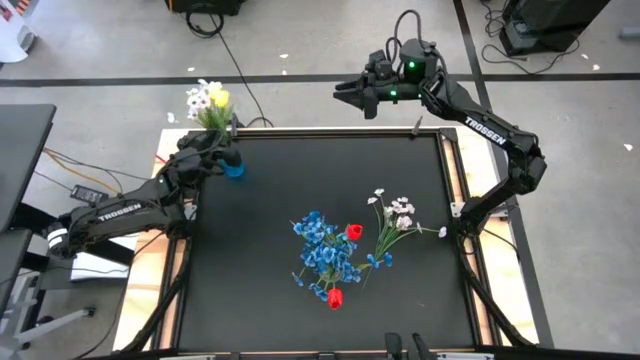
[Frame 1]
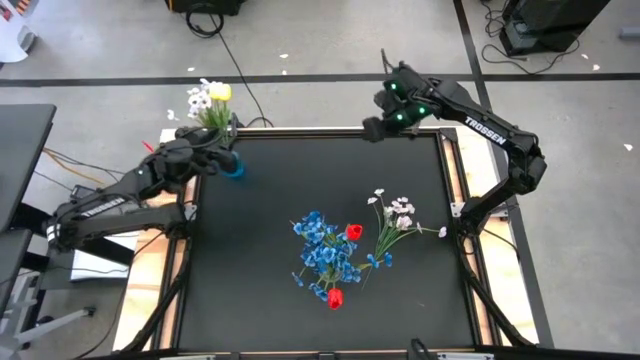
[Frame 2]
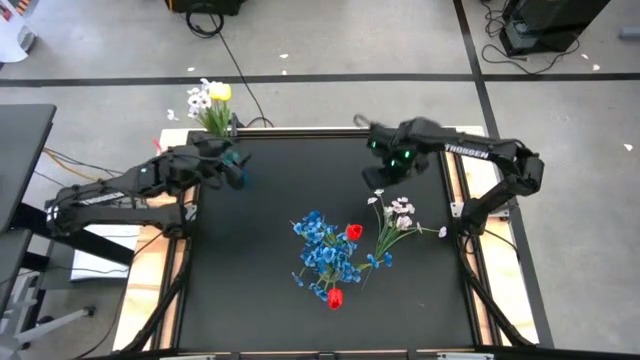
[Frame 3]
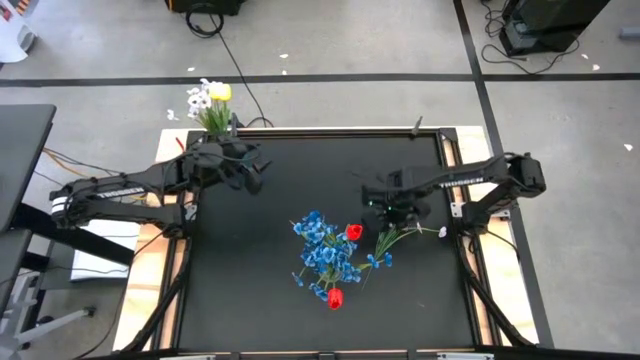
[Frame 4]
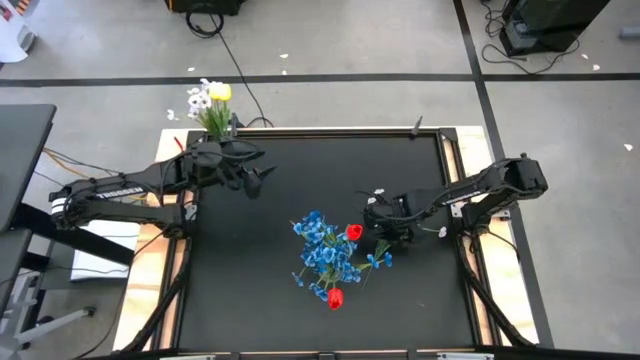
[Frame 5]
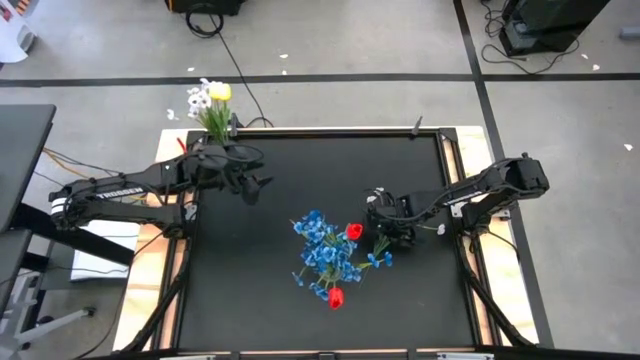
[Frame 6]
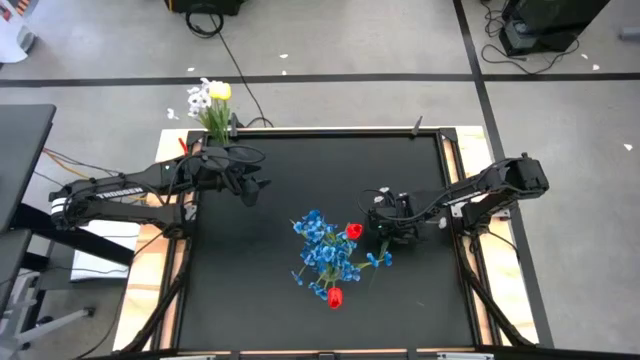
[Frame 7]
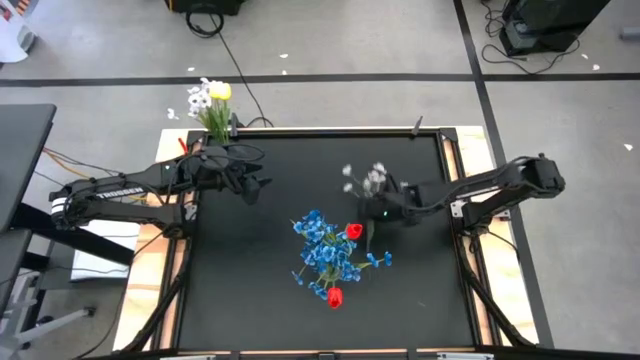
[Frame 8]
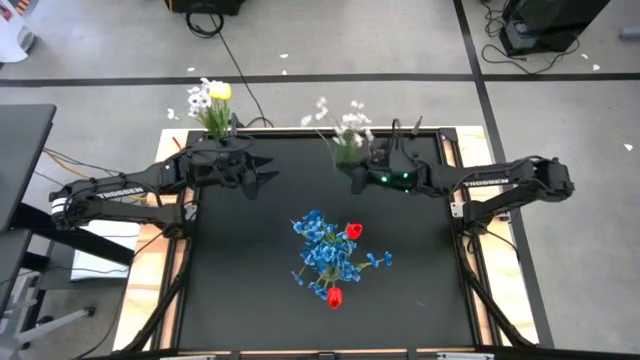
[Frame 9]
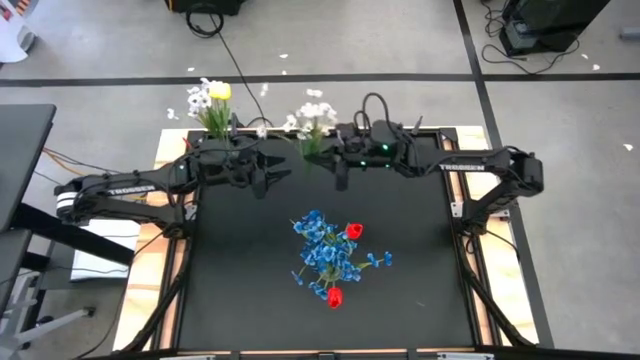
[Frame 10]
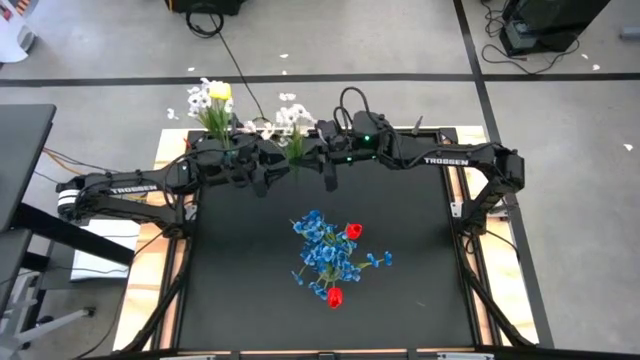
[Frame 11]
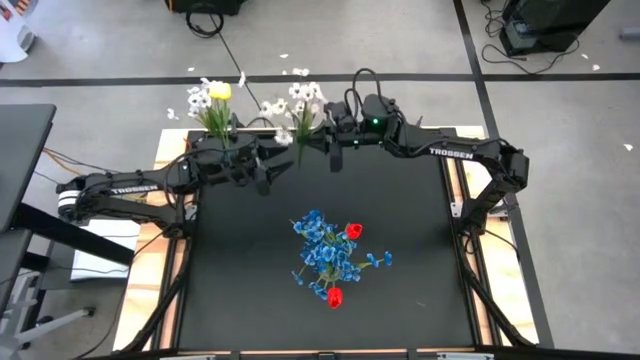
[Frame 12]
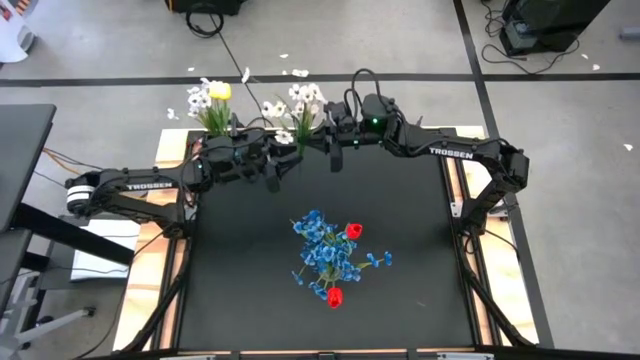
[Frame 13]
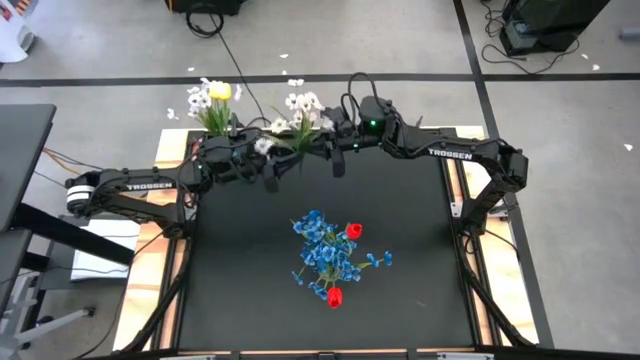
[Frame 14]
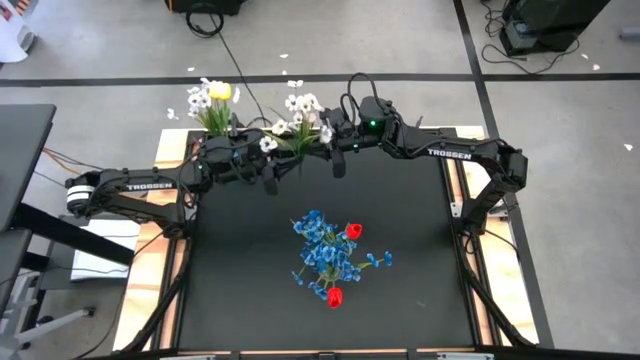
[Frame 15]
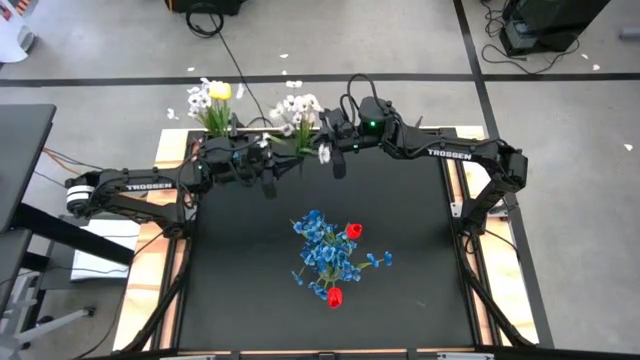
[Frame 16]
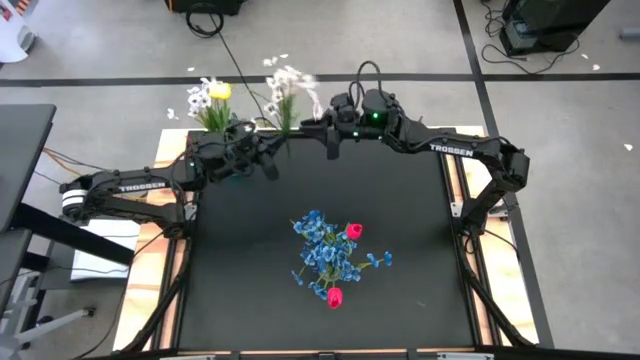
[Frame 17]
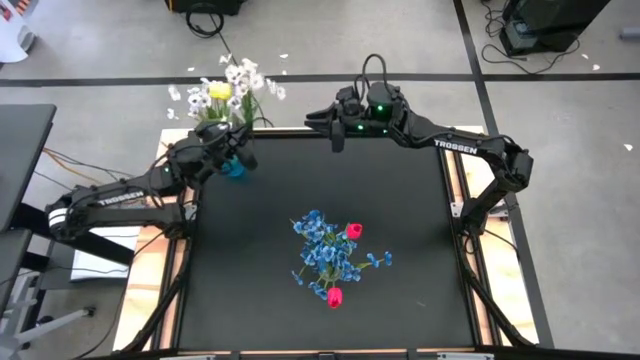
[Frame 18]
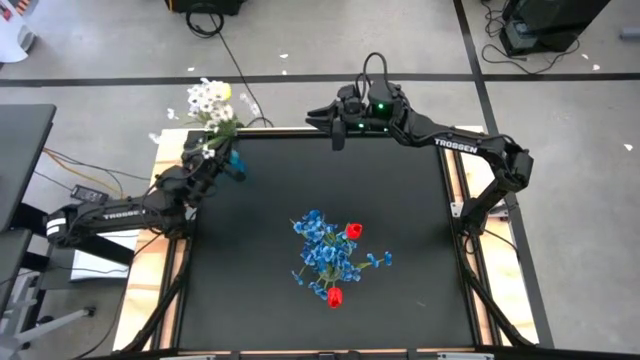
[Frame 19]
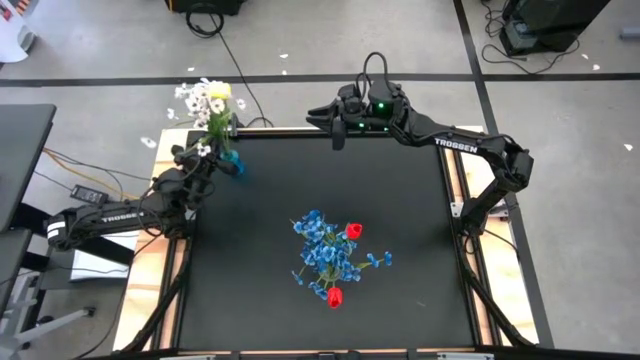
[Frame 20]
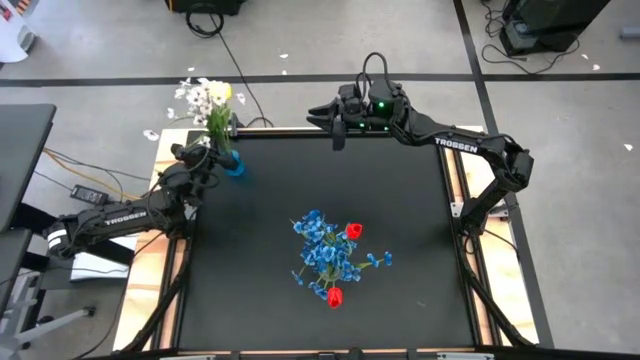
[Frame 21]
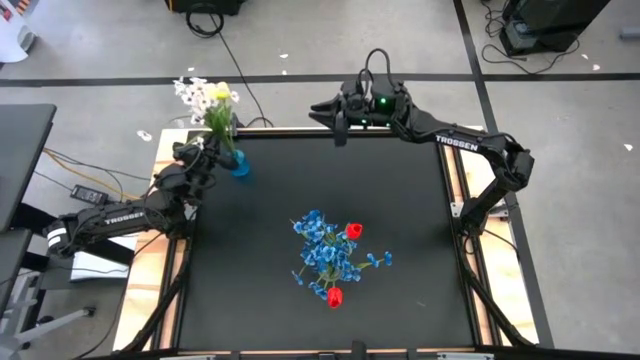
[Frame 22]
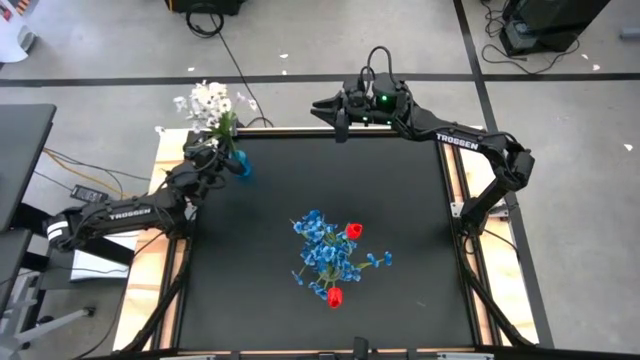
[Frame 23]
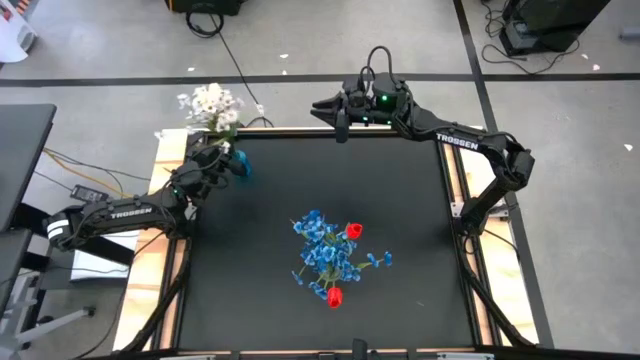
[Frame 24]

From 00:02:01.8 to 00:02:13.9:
Task: Sort flowers into vase by color
Put the white flower into the blue vase
